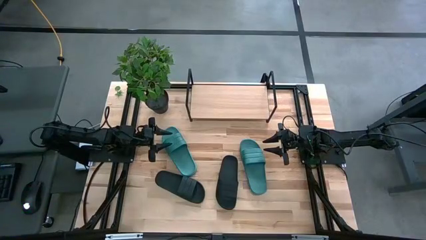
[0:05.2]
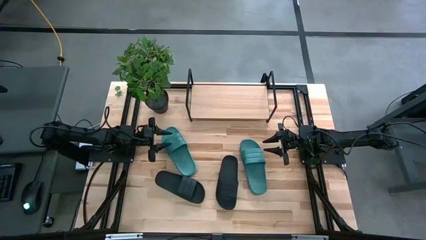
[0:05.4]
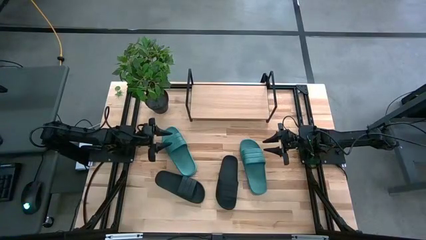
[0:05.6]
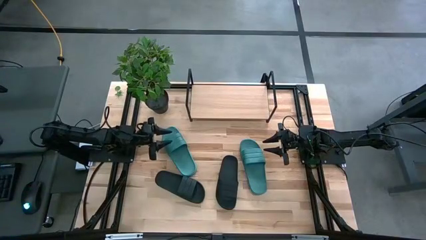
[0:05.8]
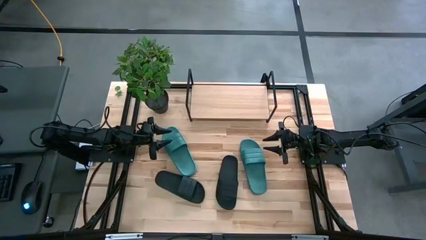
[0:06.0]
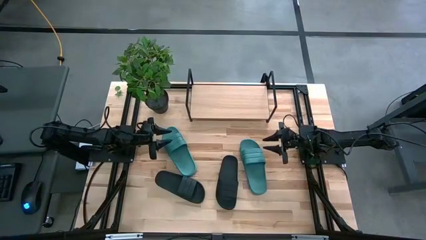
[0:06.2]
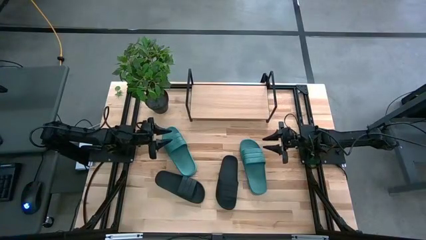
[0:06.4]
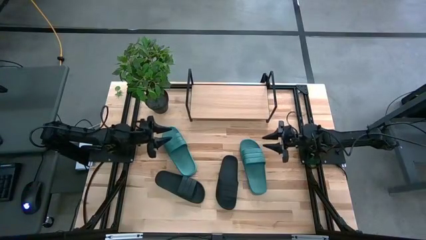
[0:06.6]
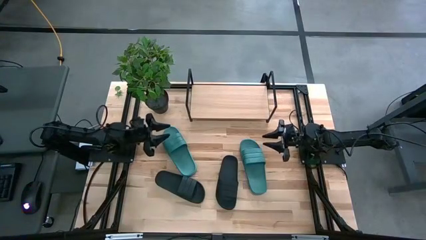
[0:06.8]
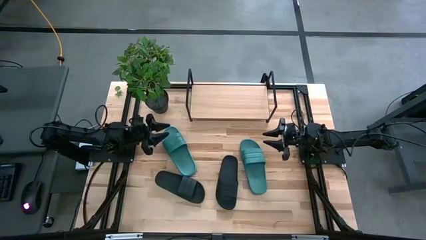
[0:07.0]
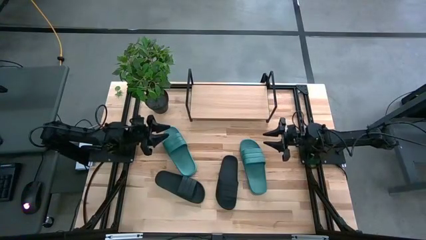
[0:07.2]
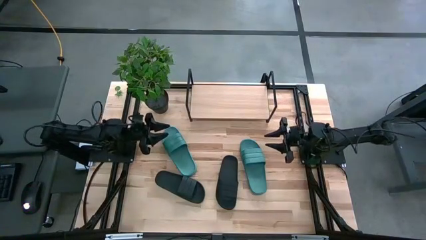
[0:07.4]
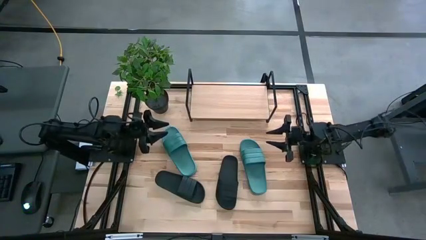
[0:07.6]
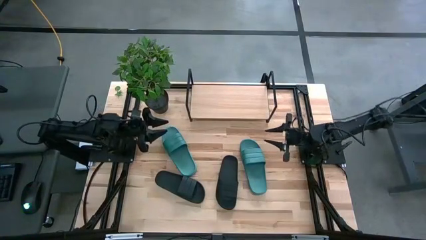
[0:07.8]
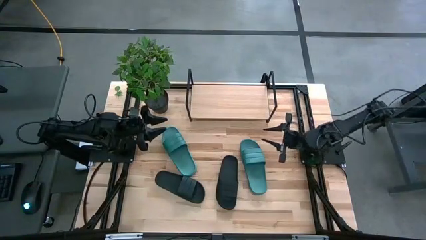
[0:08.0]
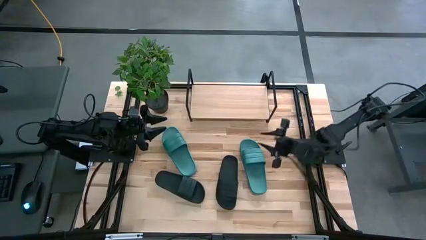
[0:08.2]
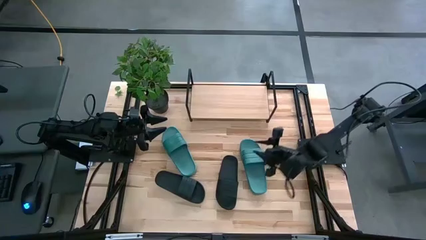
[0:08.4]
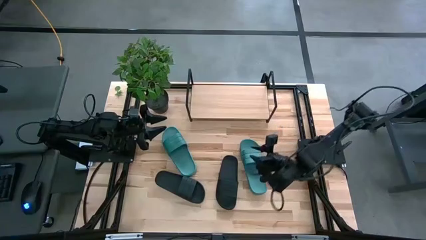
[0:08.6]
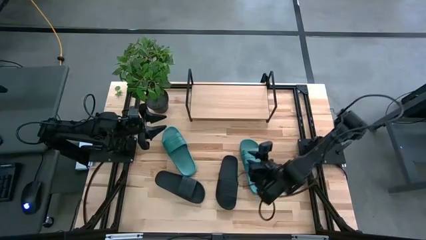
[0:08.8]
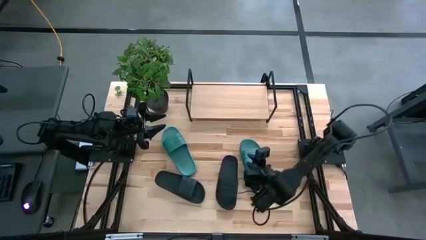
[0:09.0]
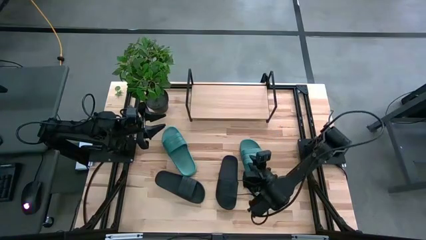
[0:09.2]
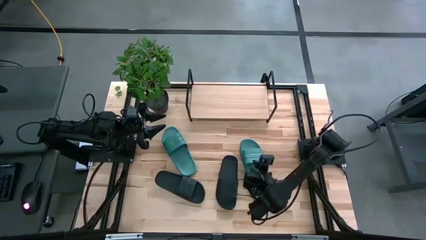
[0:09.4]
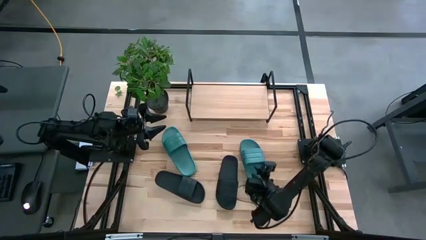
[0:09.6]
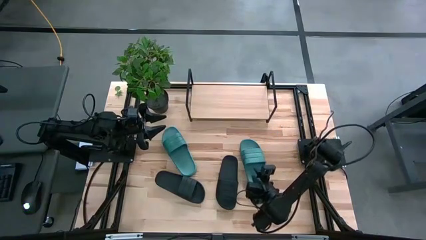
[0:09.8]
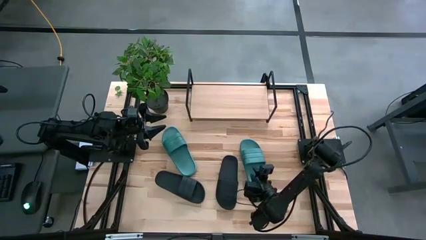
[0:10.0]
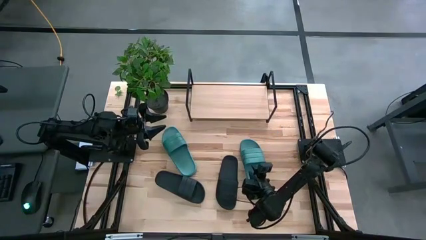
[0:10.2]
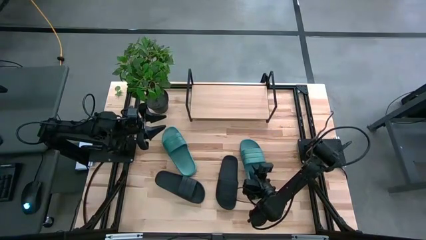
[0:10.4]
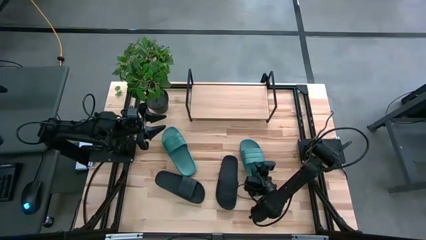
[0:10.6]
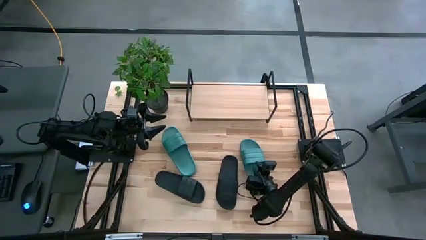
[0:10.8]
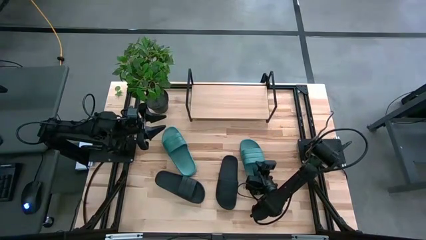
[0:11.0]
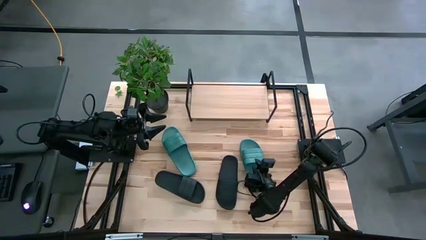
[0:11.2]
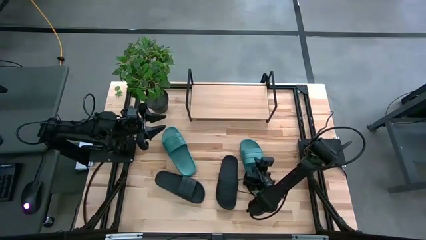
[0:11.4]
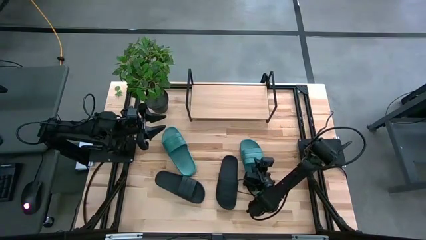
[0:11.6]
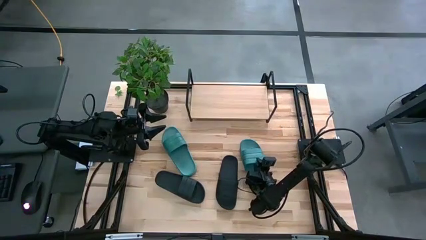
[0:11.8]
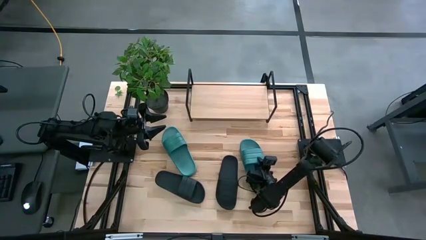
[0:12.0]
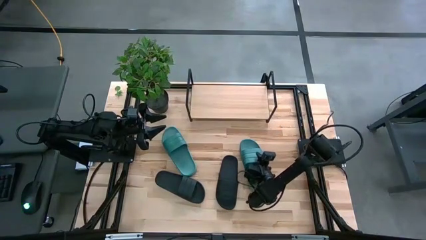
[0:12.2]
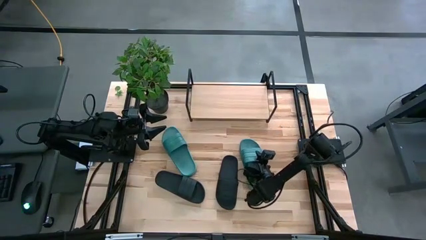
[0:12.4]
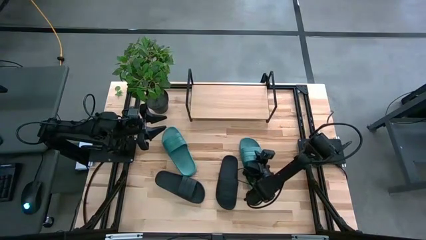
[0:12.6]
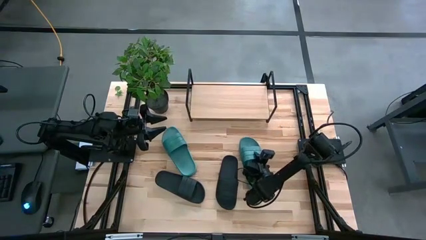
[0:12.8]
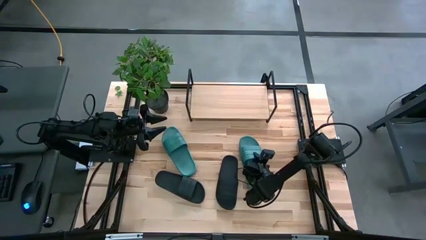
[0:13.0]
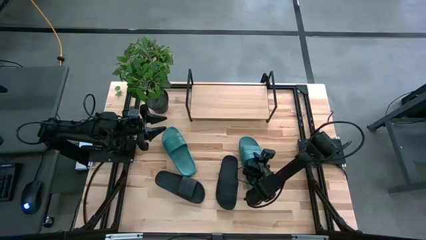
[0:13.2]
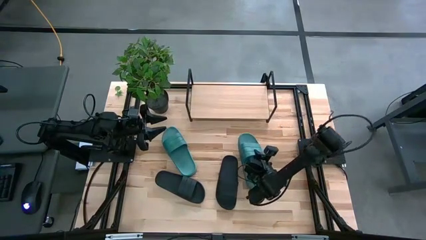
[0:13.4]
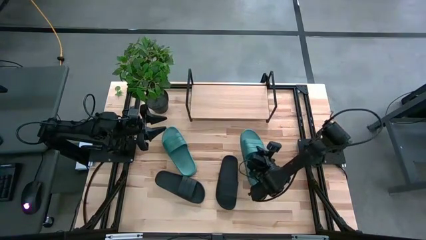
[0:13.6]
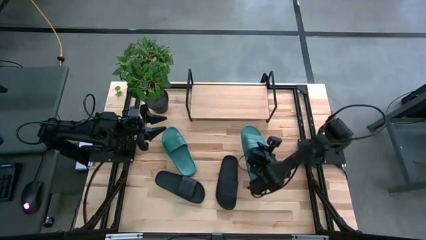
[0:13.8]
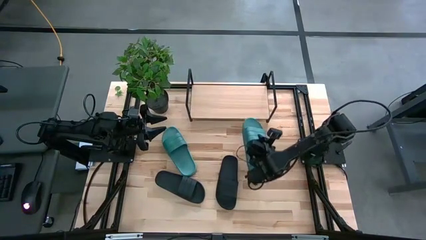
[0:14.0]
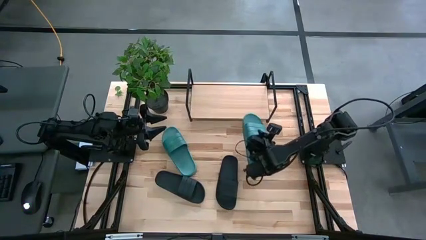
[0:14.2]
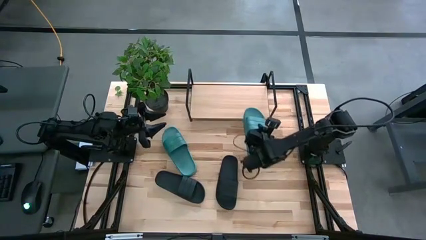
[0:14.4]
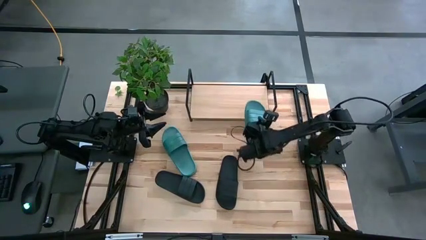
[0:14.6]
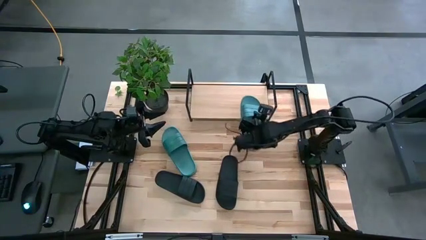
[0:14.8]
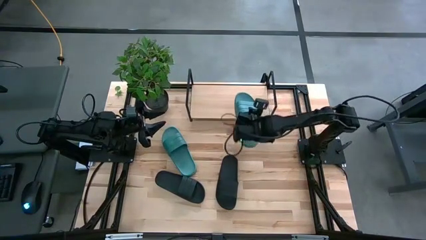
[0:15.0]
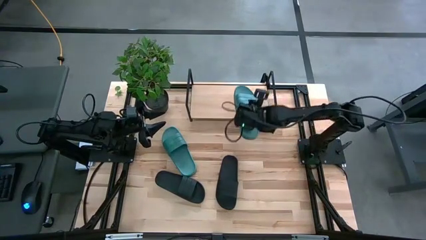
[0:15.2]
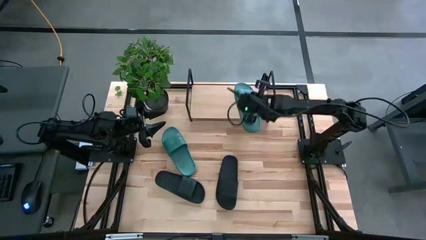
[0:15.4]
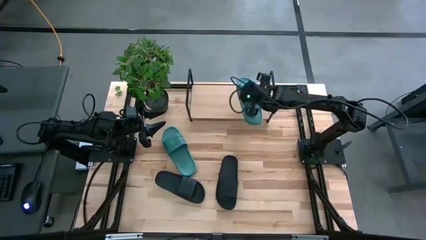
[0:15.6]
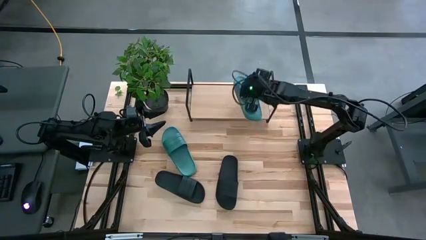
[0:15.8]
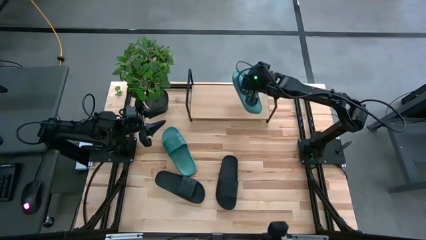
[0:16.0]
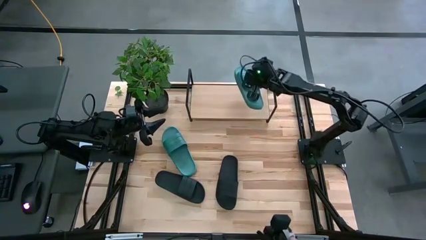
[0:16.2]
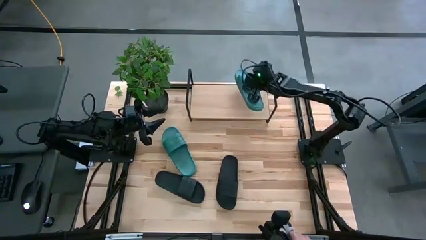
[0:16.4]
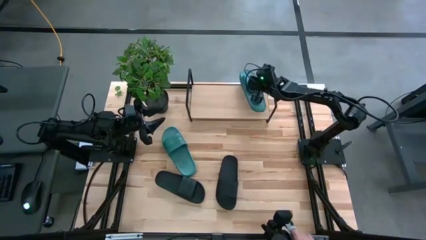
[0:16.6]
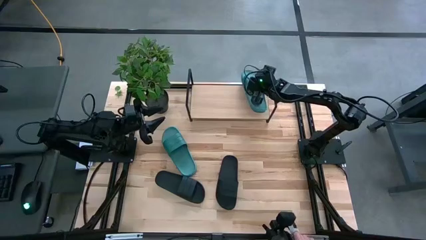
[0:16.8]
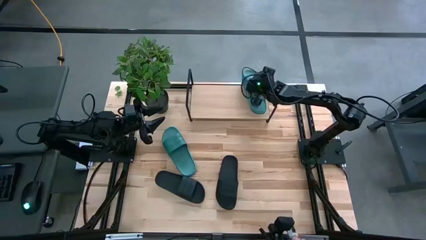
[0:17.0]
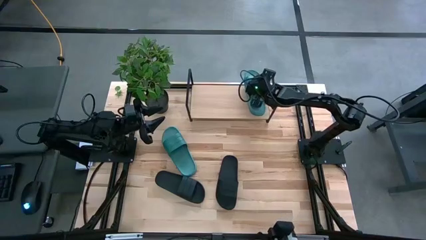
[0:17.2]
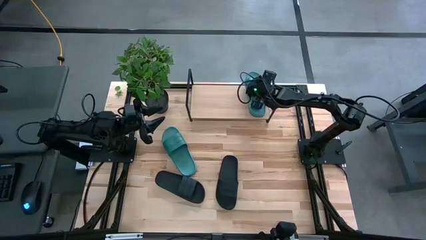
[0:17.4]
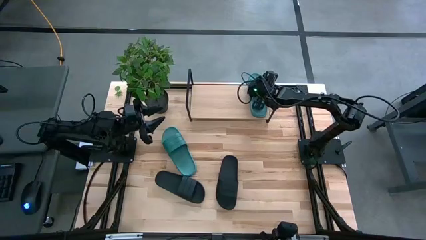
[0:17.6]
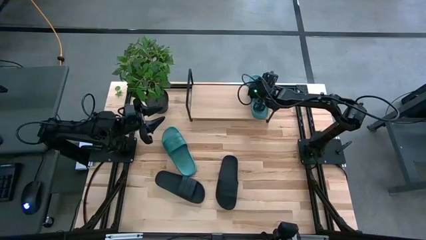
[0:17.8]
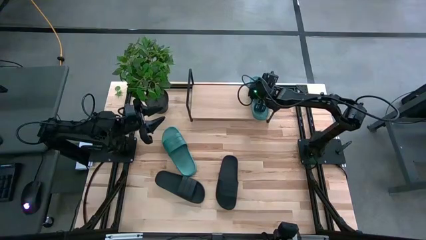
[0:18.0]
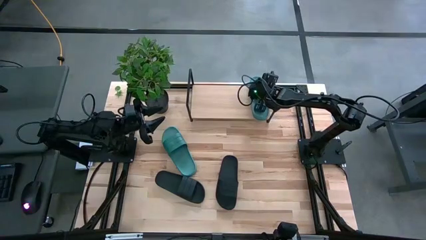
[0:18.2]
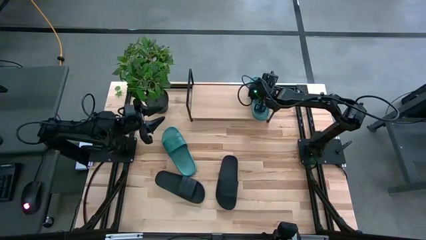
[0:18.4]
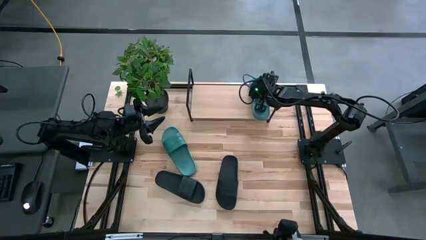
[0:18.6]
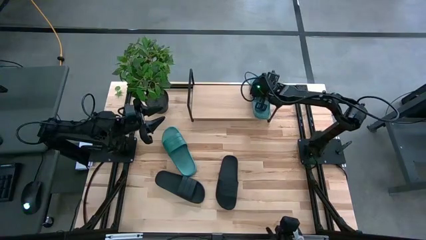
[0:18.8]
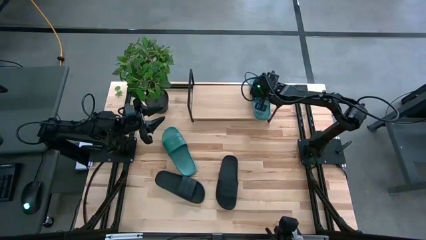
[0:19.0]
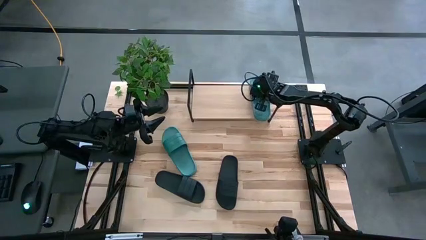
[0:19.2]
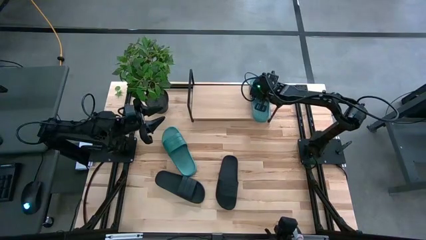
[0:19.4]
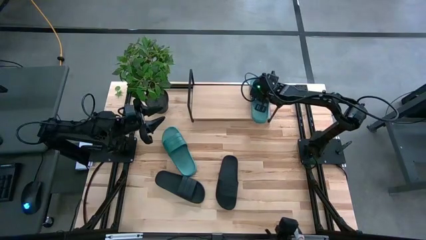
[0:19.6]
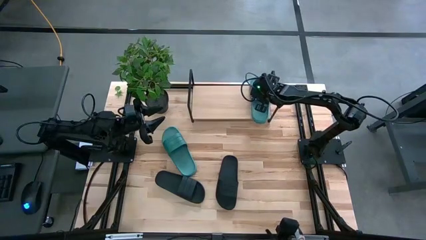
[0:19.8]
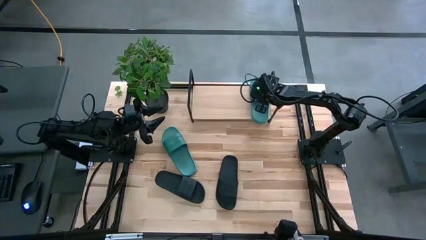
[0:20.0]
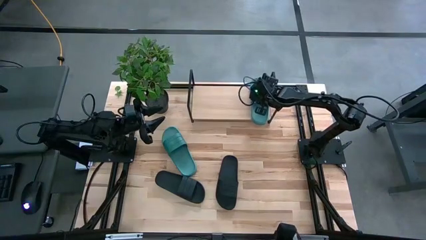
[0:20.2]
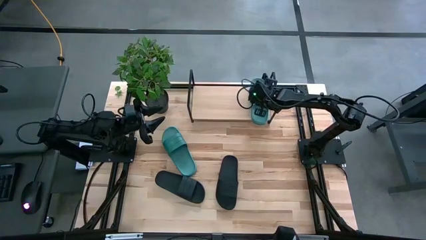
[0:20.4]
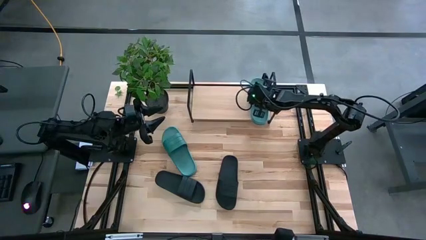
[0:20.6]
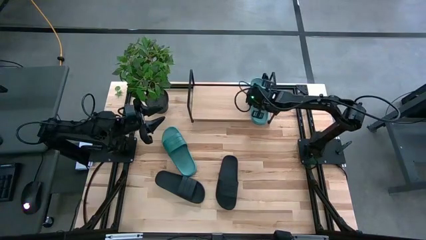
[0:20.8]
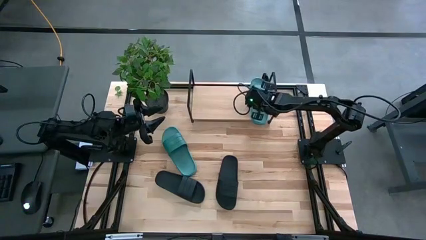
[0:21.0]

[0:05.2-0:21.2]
Task: Pick and place slides into the shelf
Put the right green slipper on the shelf
